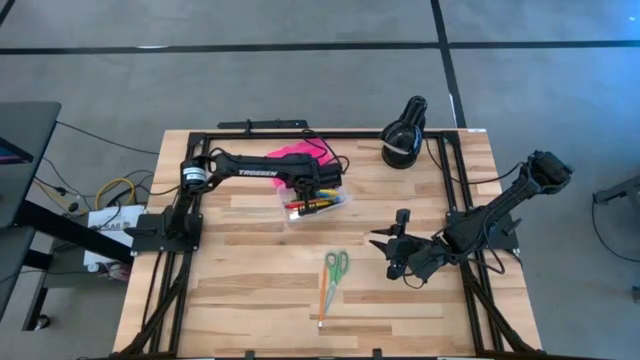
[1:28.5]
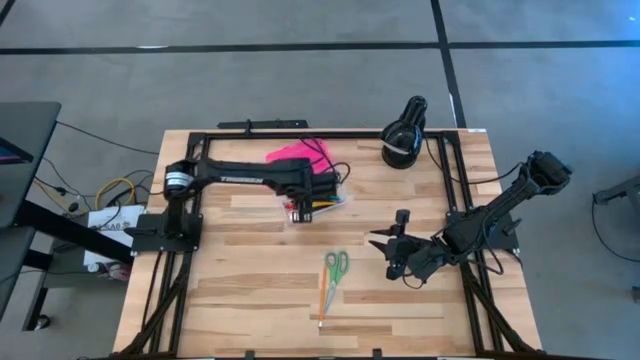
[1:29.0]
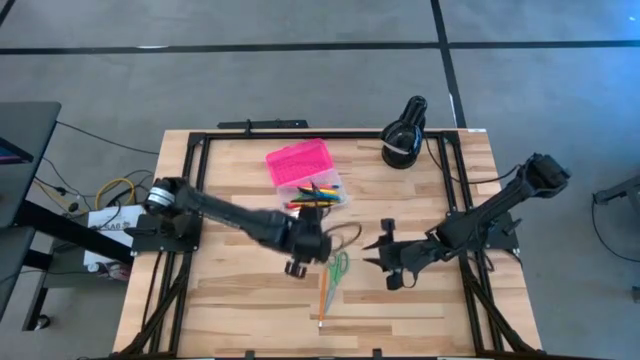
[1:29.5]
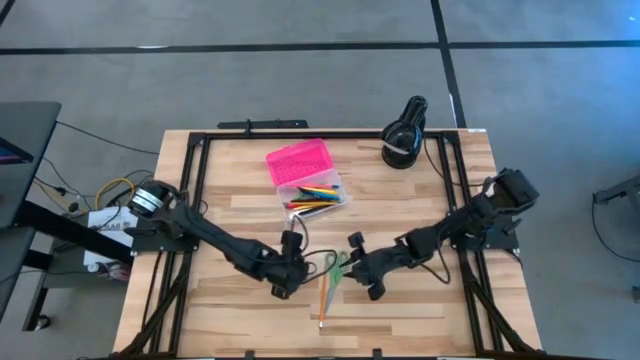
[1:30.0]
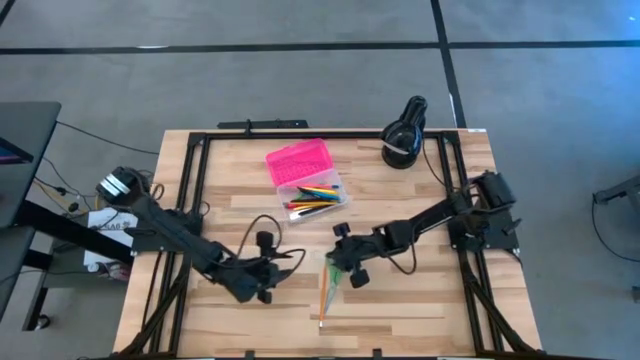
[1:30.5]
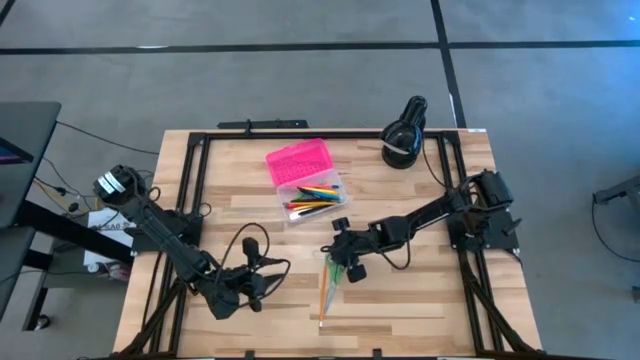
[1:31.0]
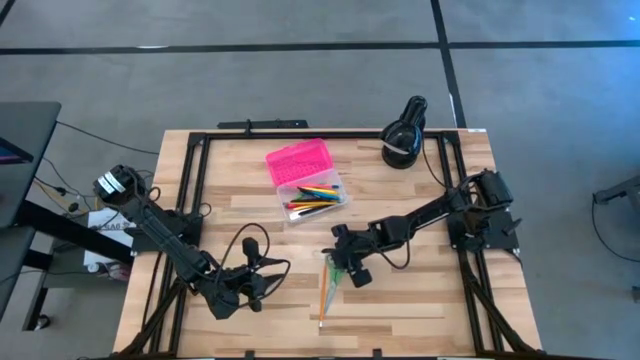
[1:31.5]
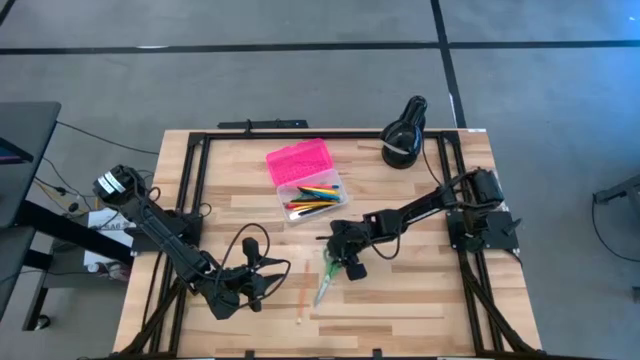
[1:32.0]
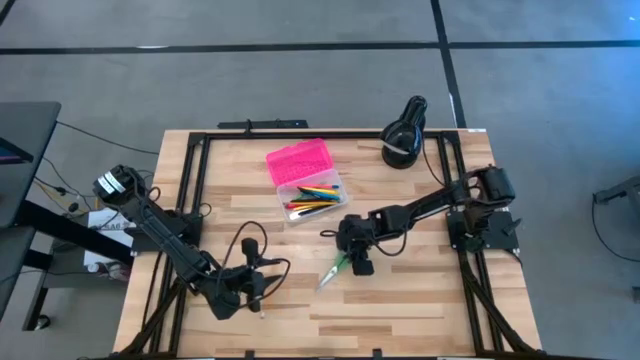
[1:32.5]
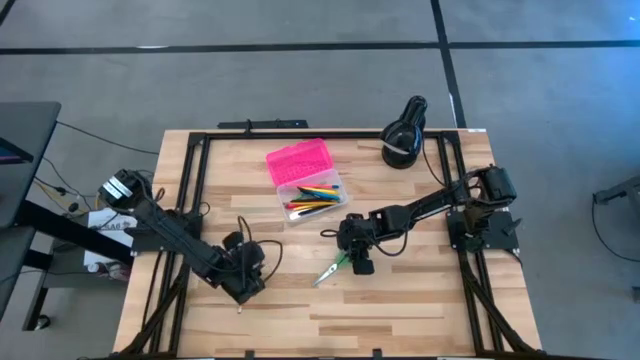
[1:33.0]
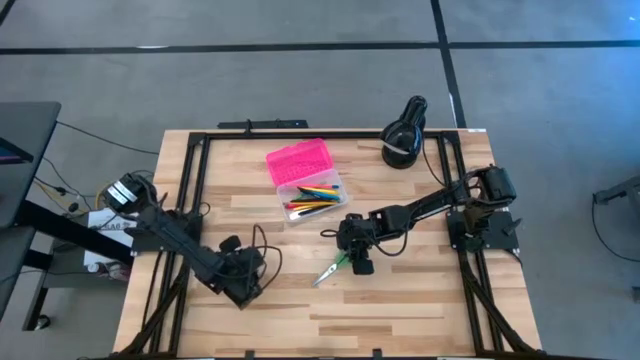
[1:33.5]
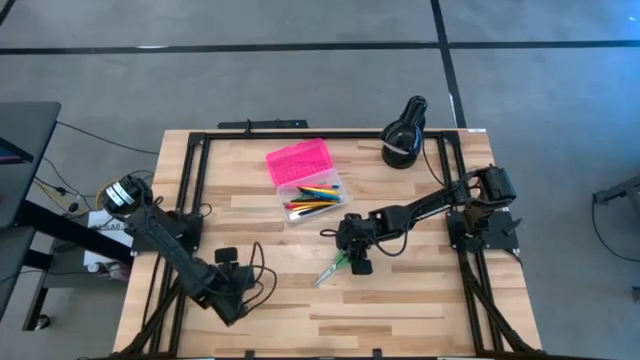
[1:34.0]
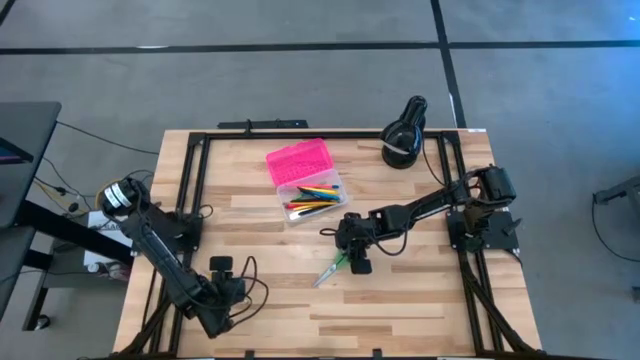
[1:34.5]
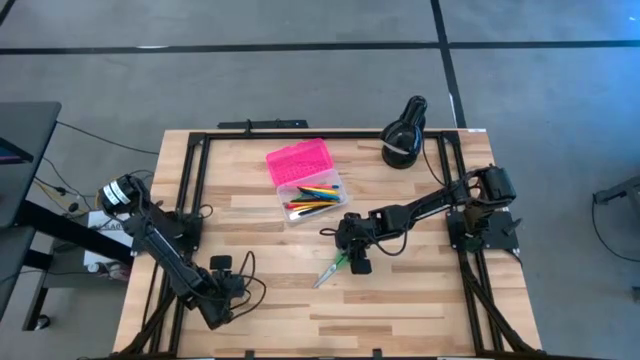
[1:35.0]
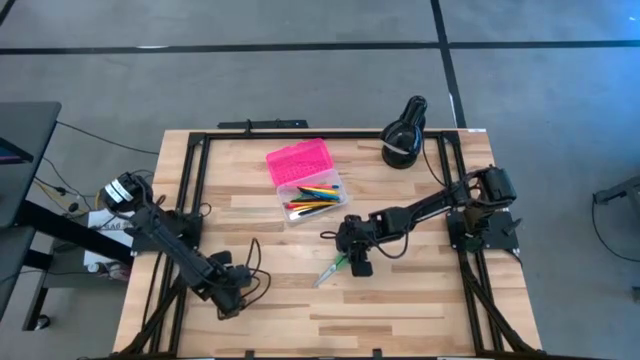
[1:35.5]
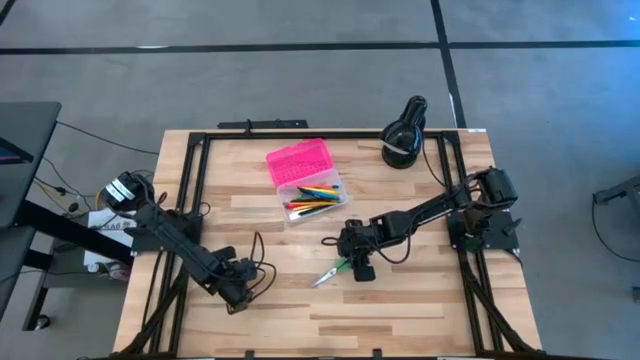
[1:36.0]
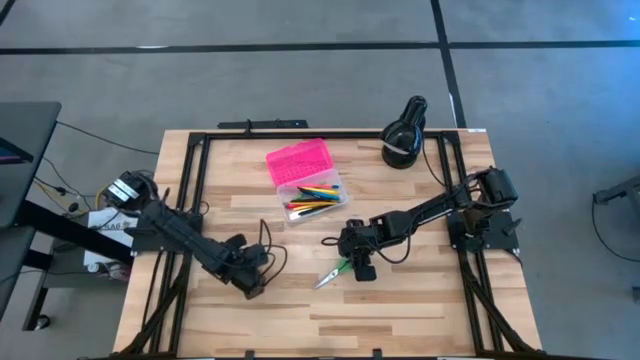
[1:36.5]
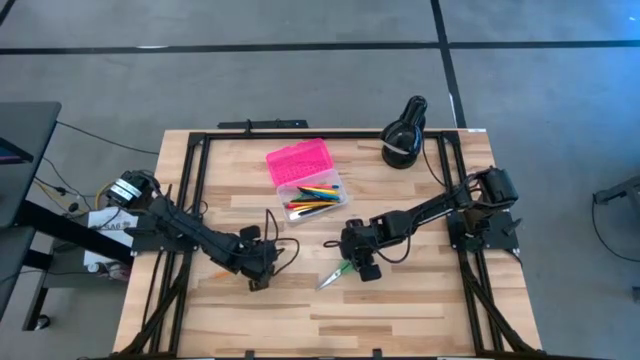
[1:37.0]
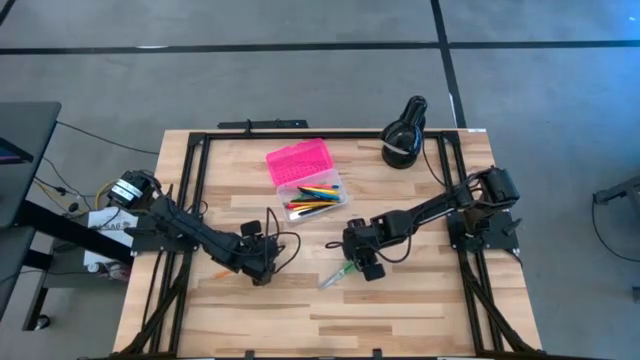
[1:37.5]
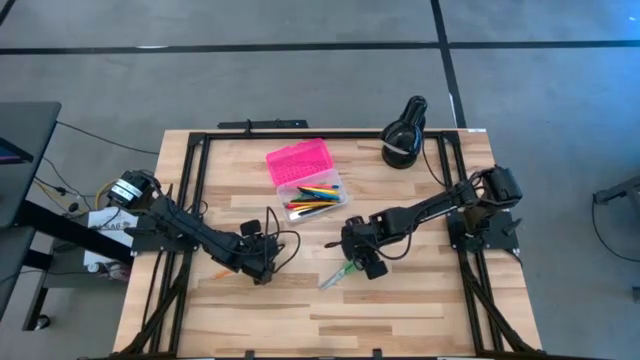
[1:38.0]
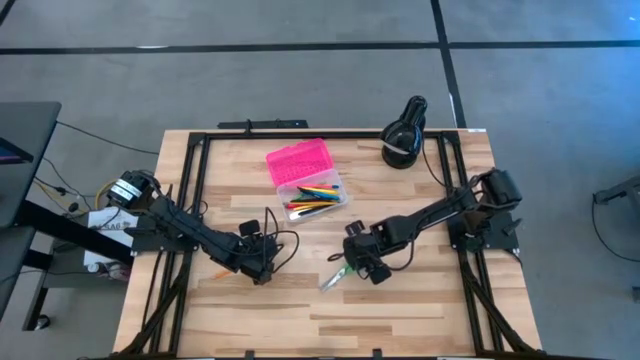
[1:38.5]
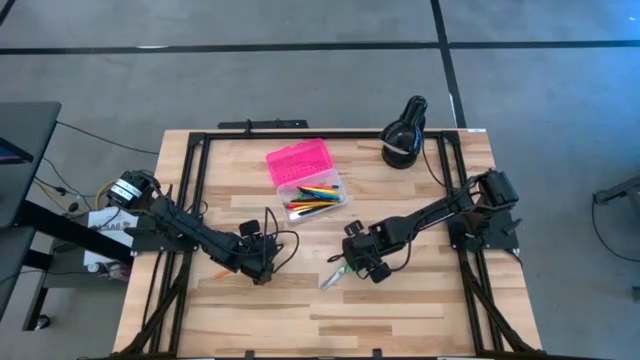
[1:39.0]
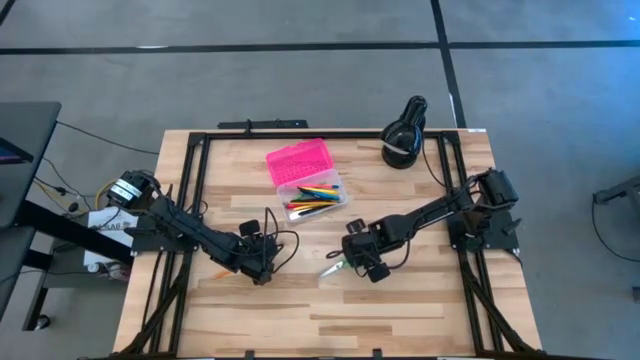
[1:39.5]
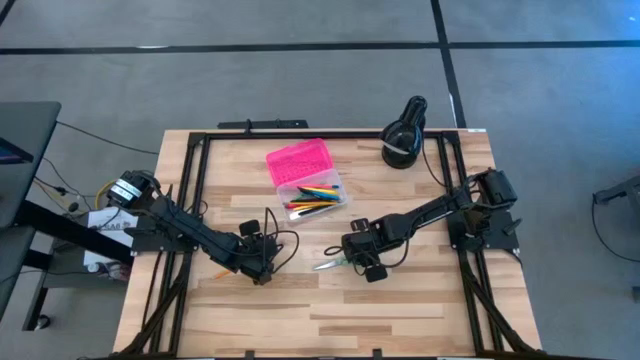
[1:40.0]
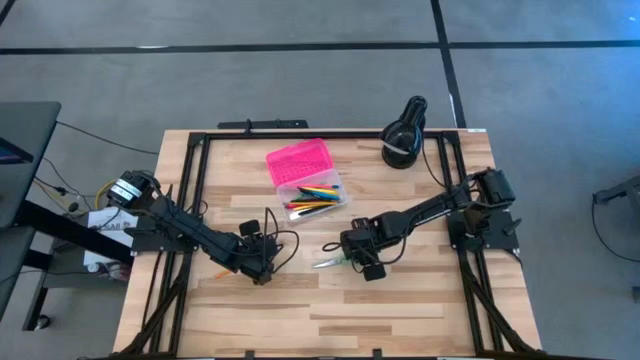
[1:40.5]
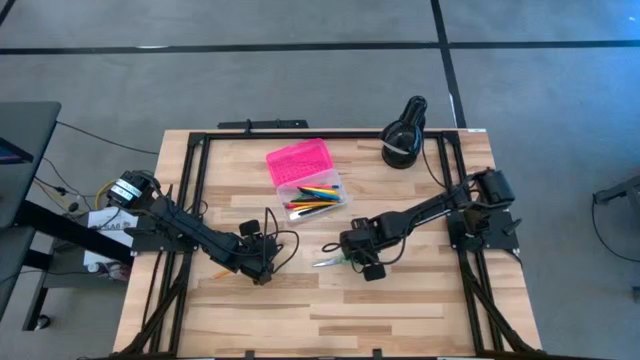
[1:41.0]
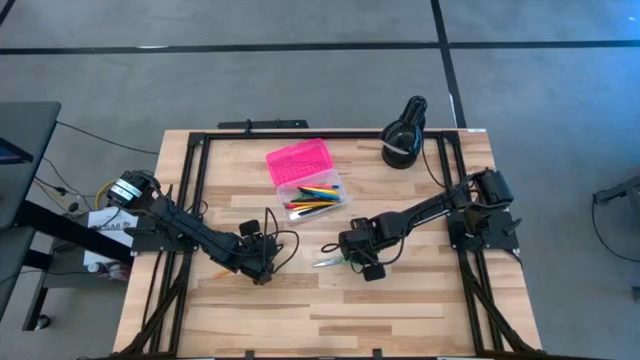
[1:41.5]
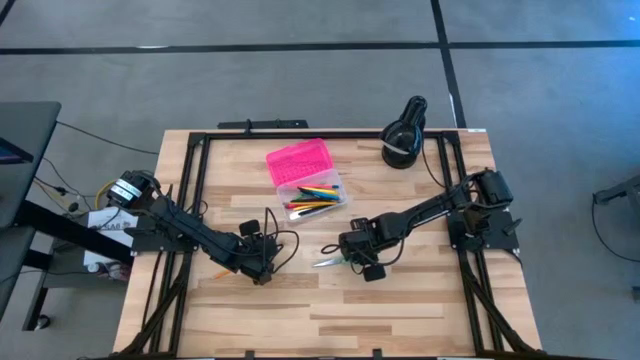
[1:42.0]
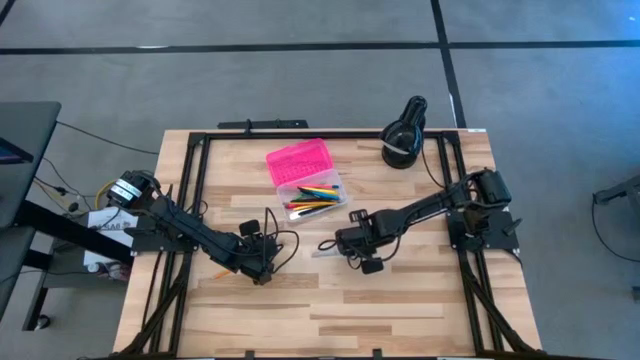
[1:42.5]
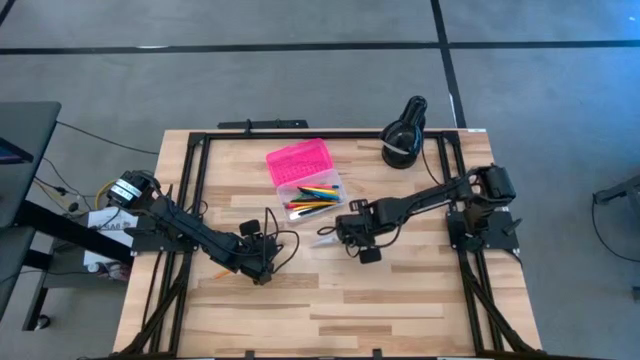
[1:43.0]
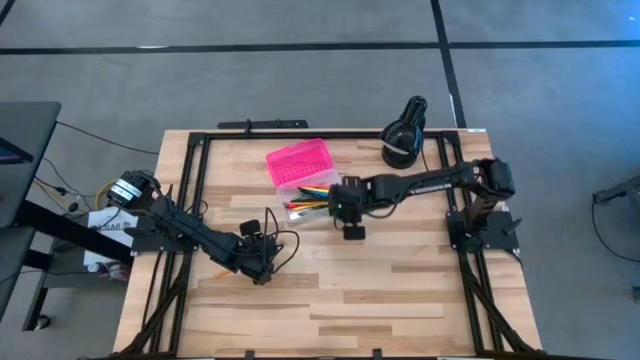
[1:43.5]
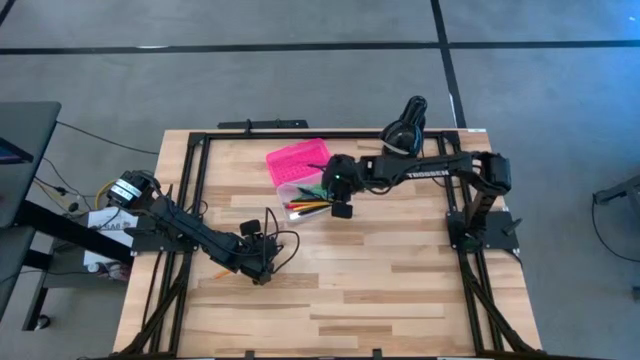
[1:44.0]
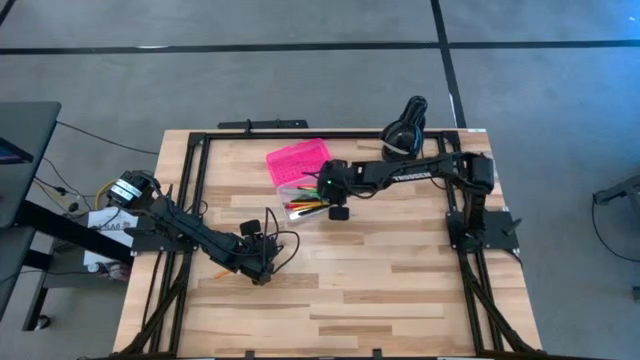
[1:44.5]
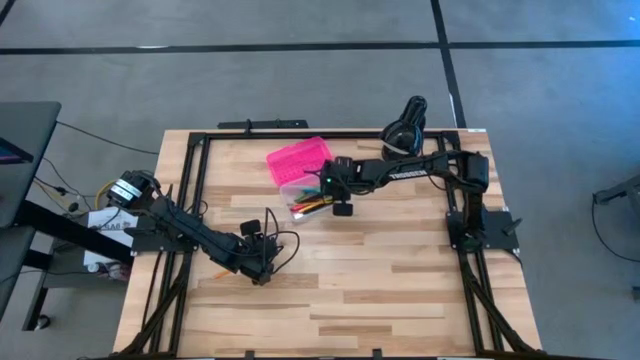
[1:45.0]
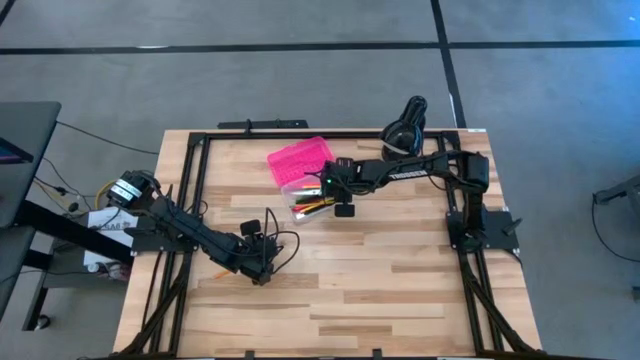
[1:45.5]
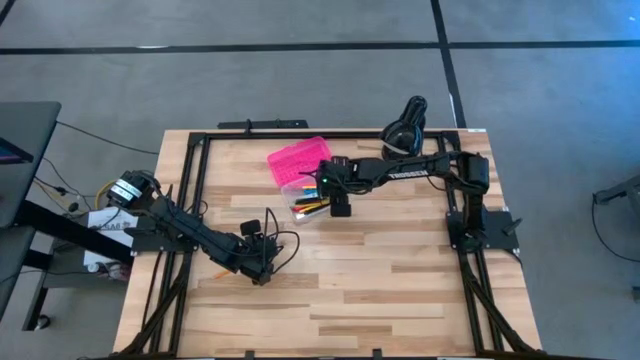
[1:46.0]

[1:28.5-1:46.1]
Task: Pick & place school supplies into a supply box
Put the green scissor into the pink supply box

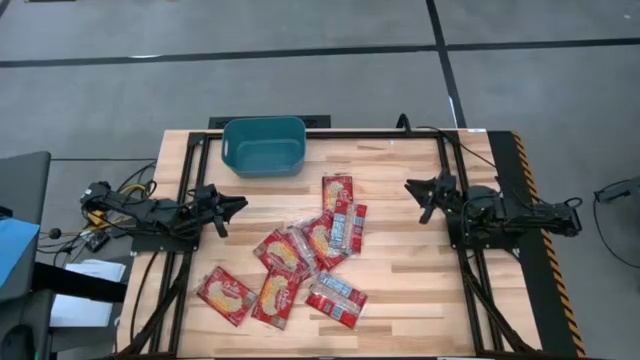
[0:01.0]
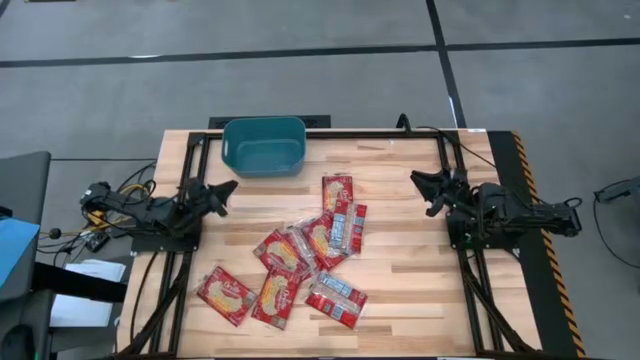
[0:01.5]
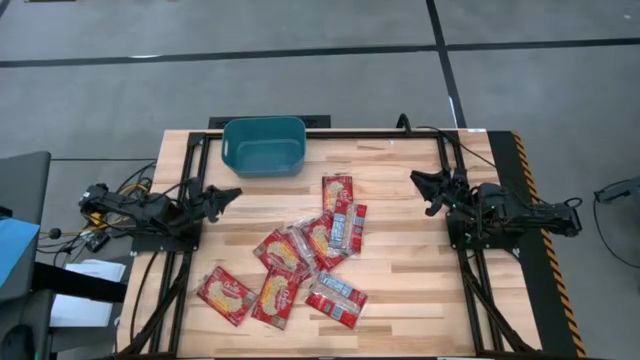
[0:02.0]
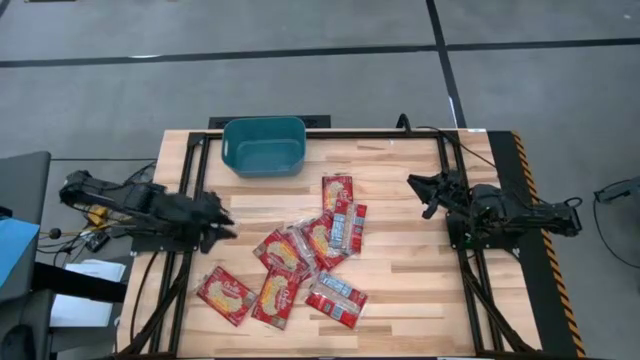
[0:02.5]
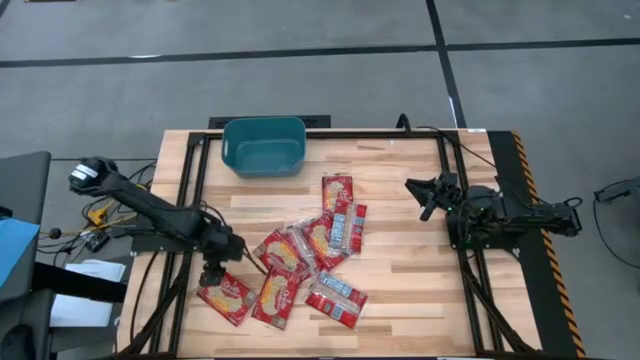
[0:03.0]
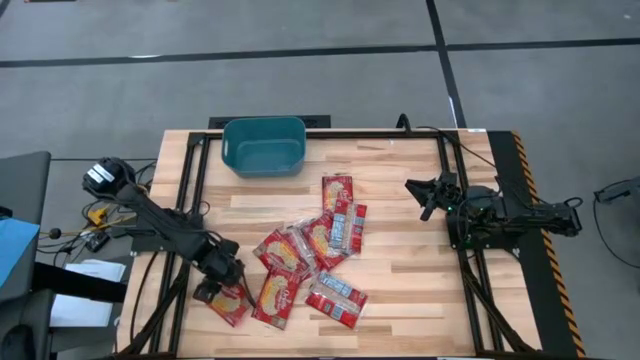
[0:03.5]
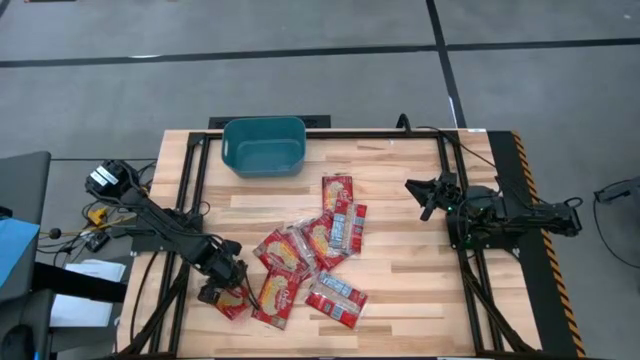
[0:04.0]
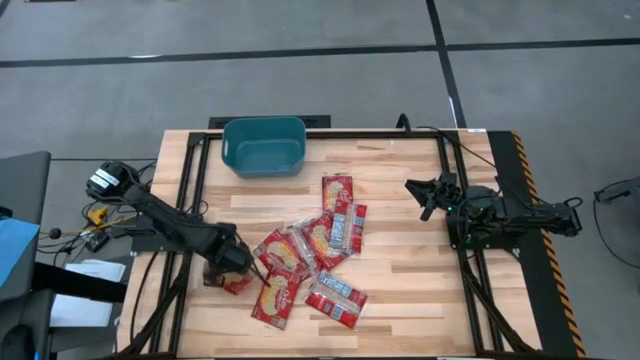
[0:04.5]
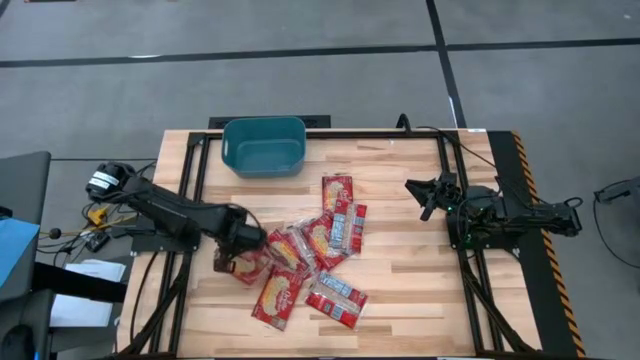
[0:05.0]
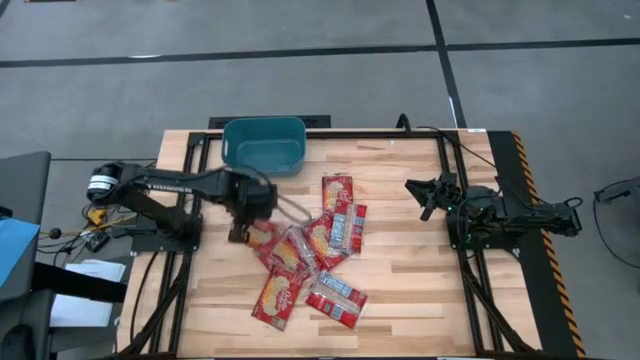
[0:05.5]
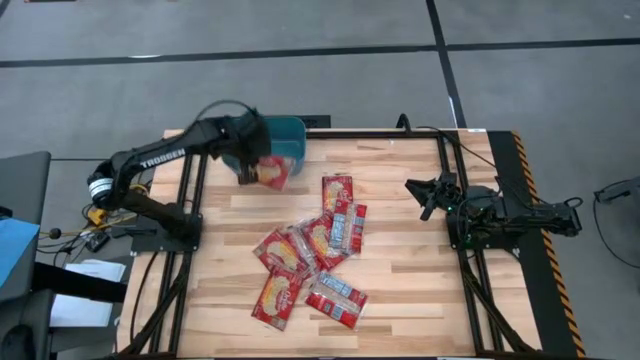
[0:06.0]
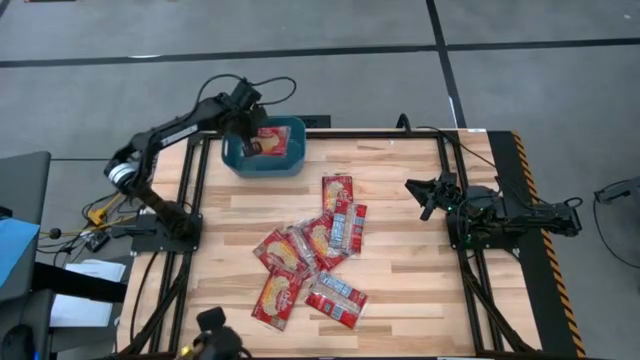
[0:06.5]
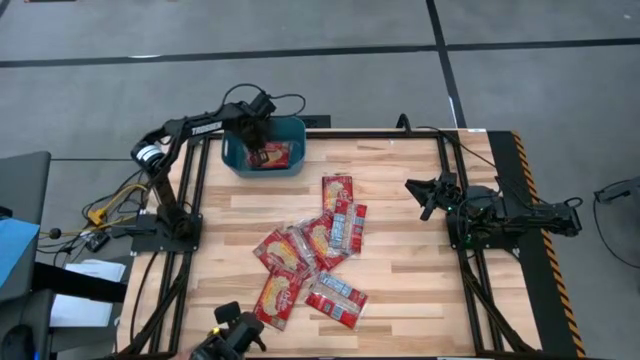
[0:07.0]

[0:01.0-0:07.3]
Task: Sort popcorn bags into baskets
Put the red popcorn bag into the blue bin
